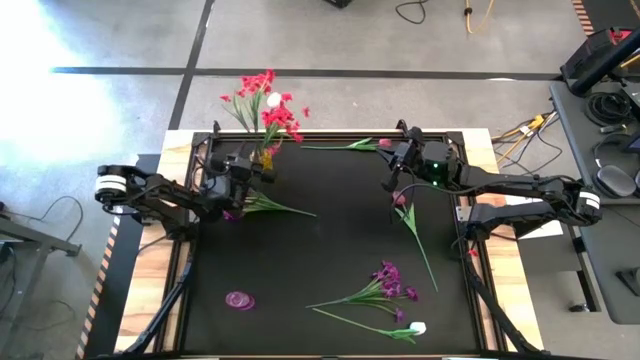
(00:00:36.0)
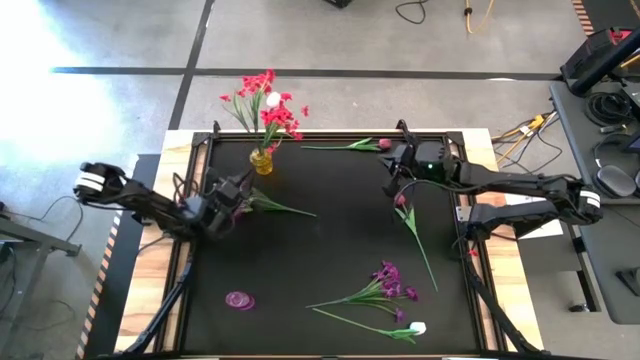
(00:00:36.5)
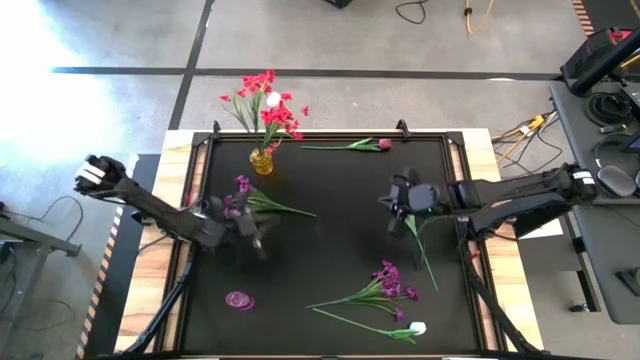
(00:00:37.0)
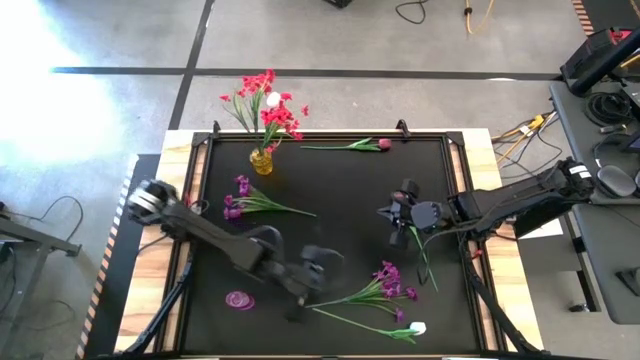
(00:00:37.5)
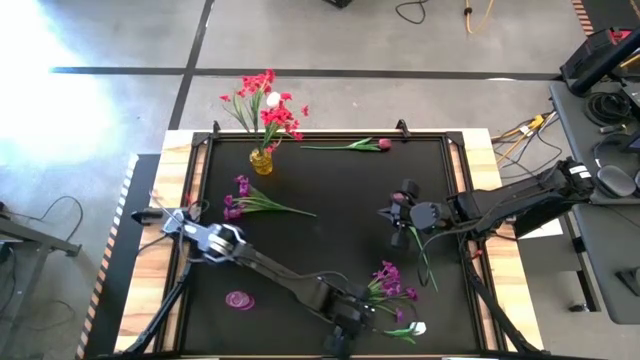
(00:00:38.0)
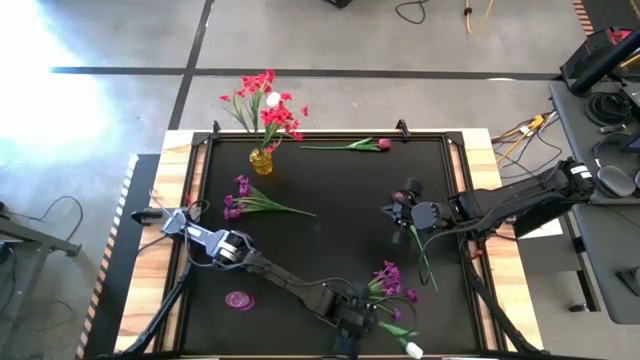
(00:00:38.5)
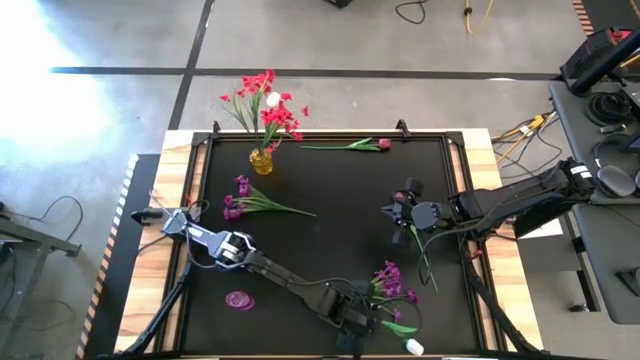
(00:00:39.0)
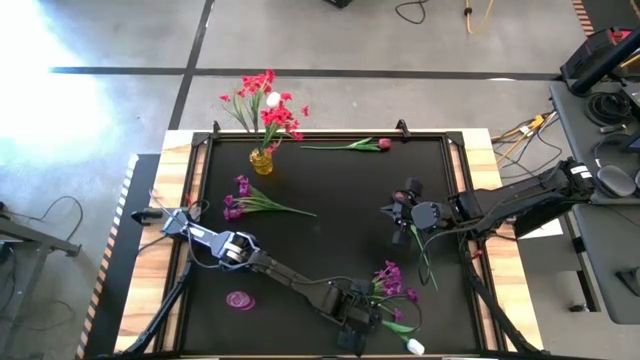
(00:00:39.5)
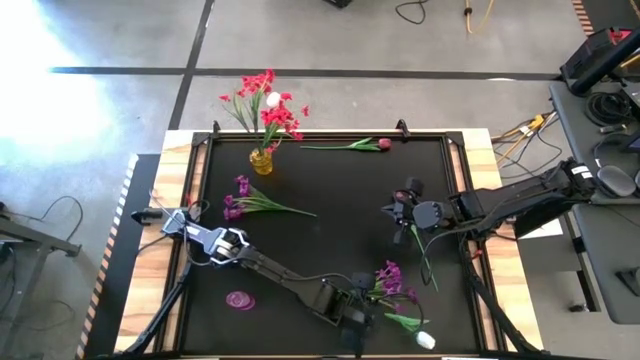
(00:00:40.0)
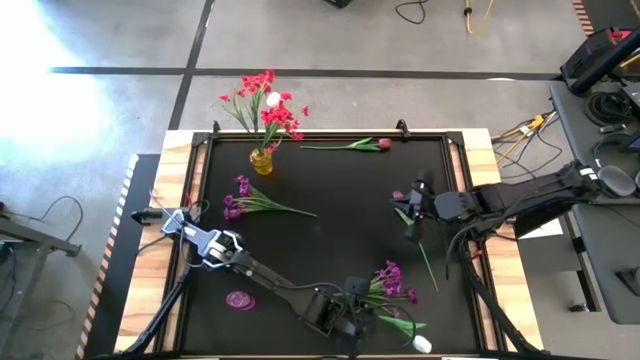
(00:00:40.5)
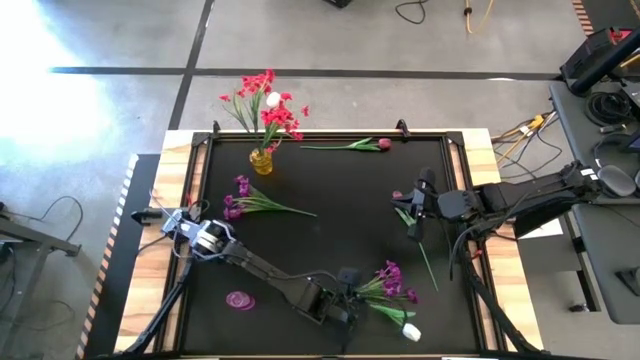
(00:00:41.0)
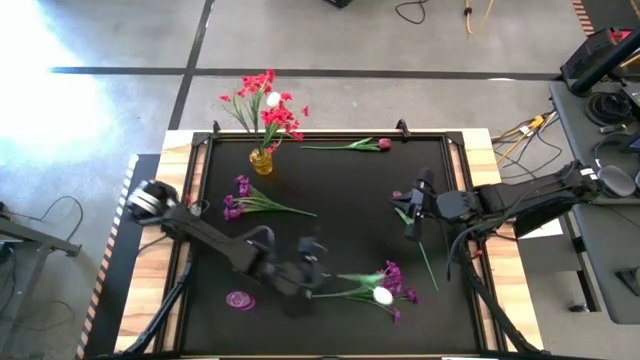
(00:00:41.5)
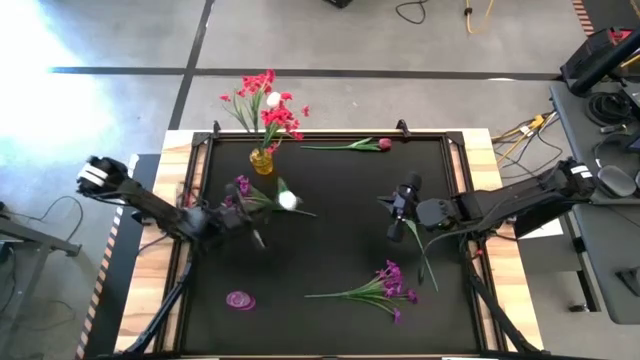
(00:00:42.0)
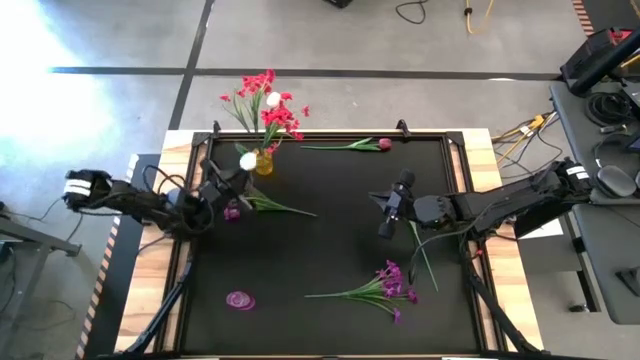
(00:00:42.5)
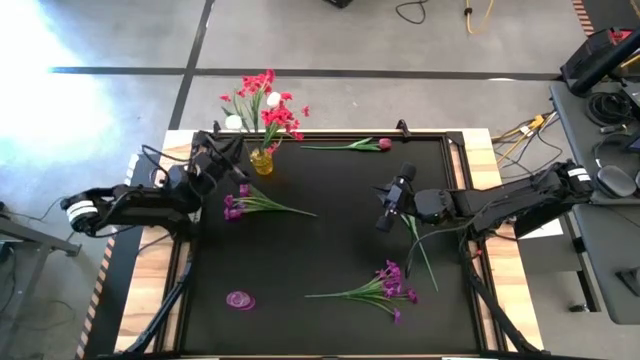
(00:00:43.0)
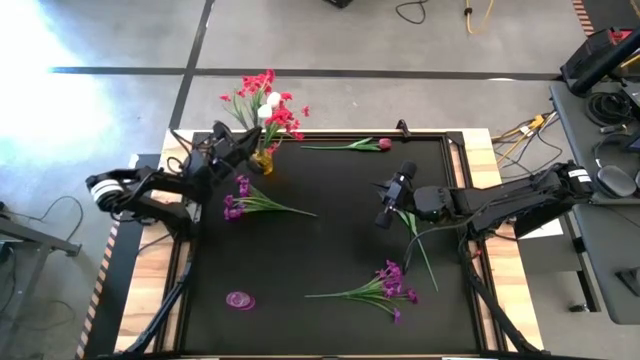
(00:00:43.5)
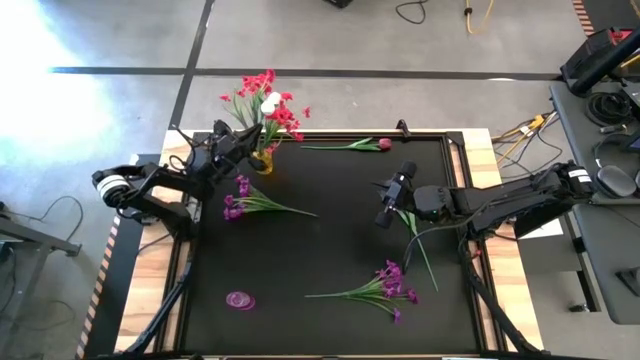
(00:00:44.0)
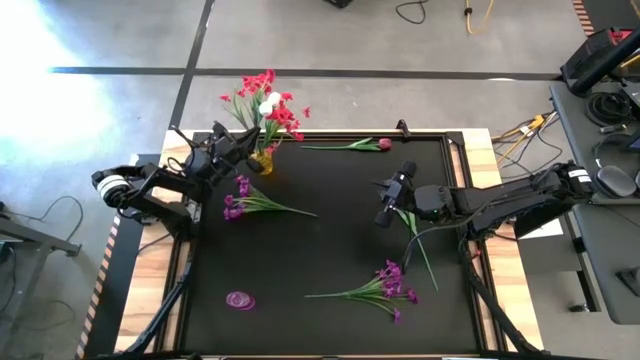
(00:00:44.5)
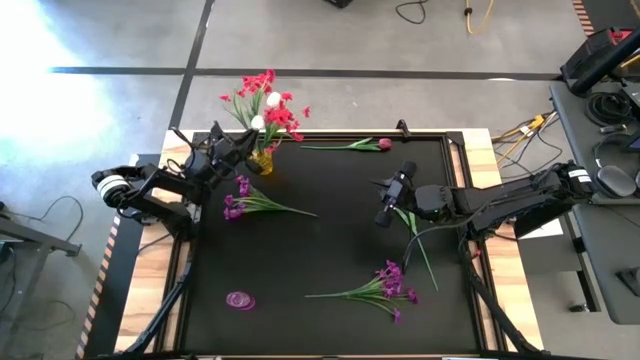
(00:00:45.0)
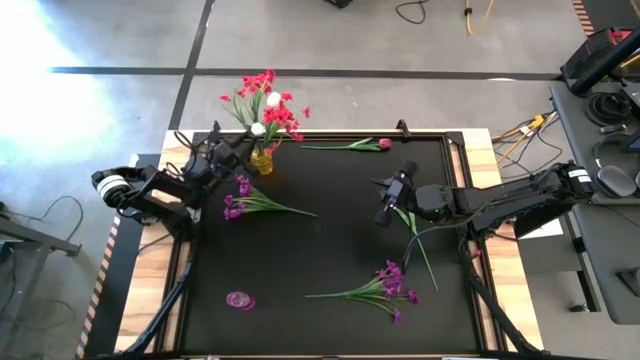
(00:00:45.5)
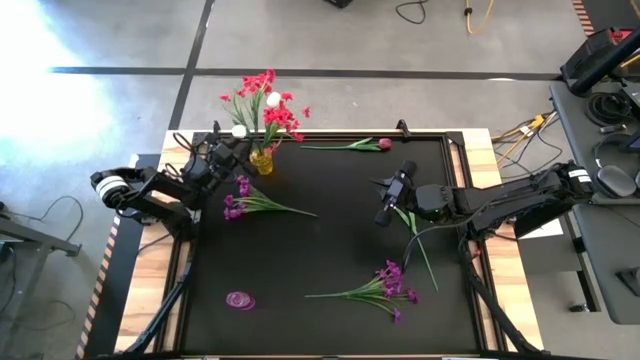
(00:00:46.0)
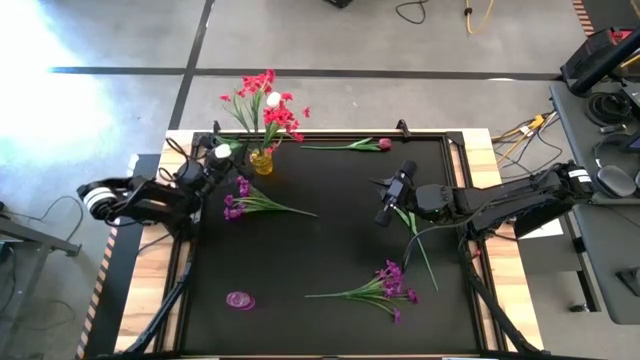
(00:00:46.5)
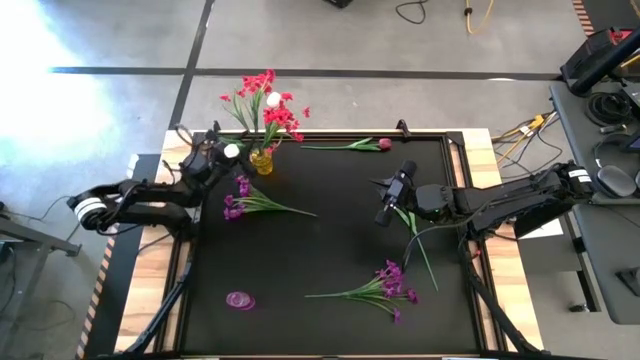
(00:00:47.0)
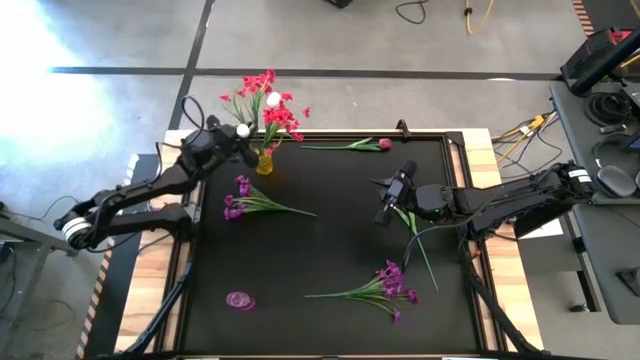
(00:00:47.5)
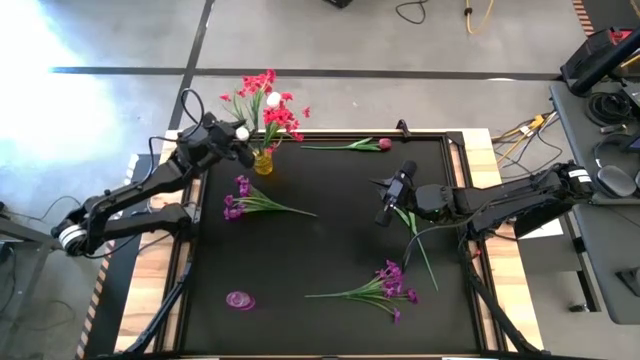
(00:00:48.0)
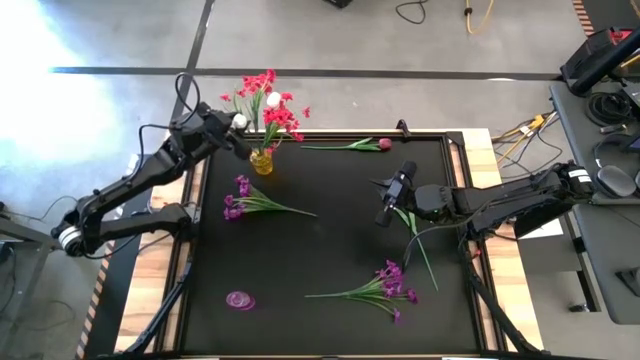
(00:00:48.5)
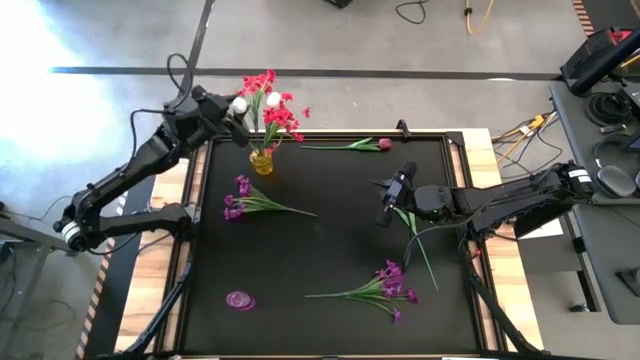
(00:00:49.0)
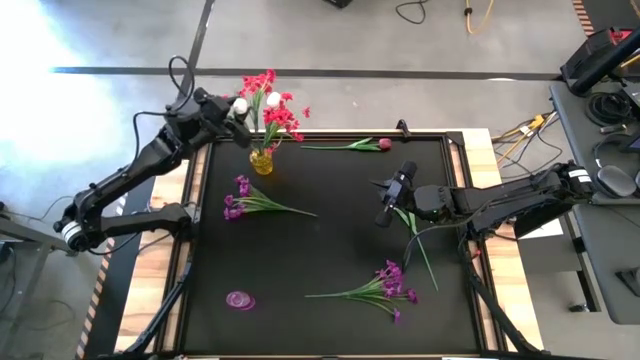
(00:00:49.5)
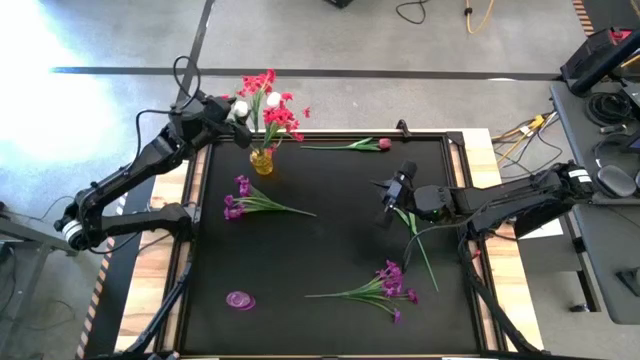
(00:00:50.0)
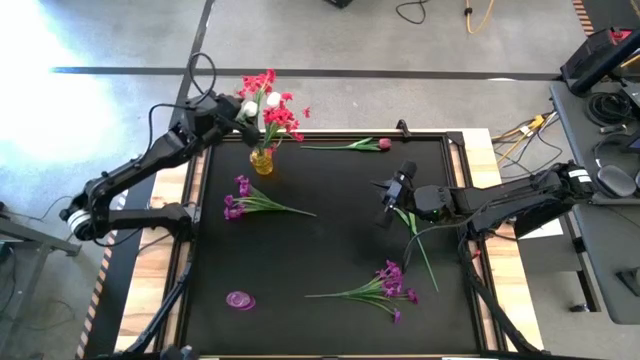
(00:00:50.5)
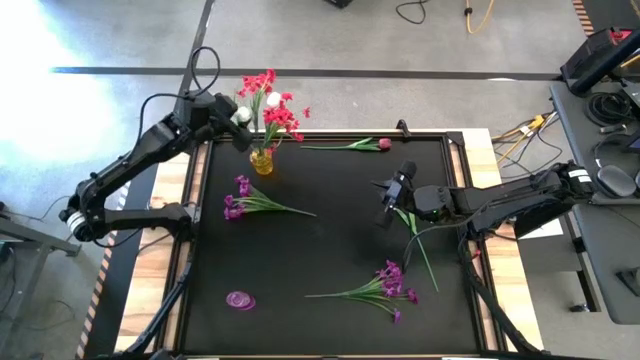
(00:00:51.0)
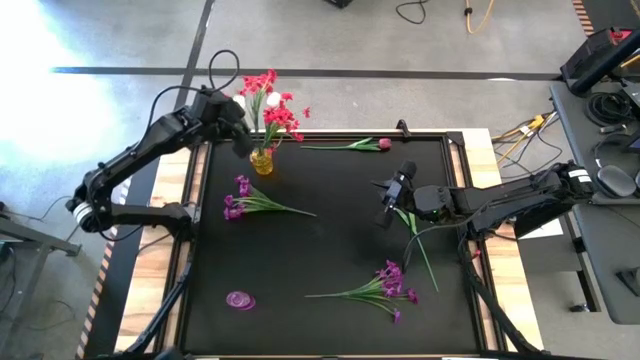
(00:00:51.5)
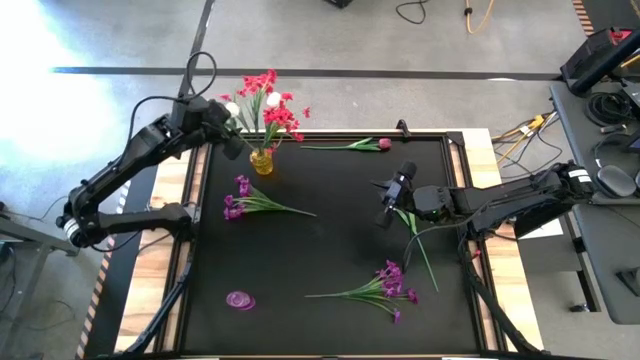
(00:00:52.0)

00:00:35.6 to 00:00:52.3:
Task: Sort flowers into vase by color
Put the white tulip into the yellow vase
